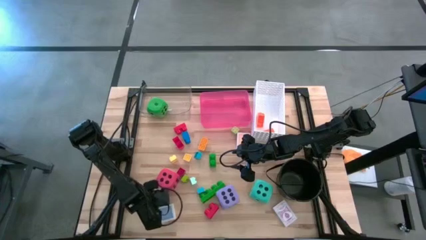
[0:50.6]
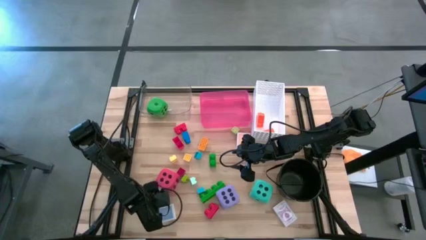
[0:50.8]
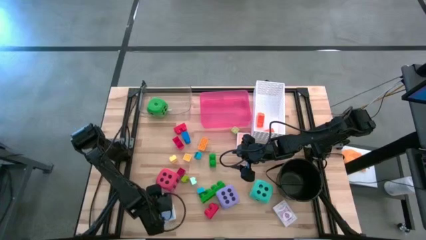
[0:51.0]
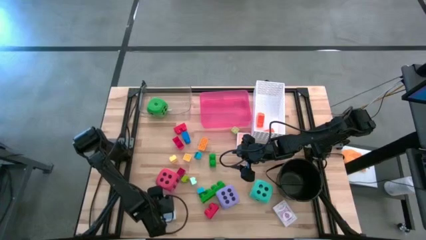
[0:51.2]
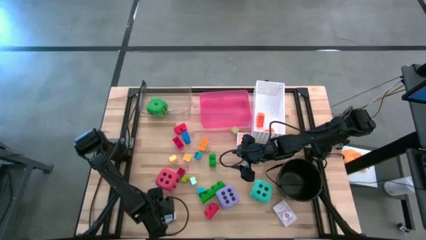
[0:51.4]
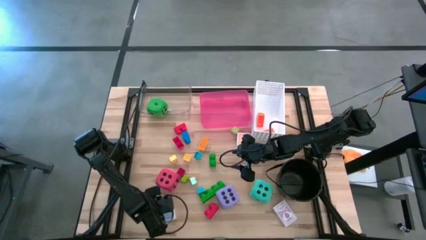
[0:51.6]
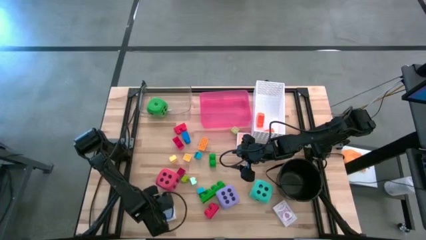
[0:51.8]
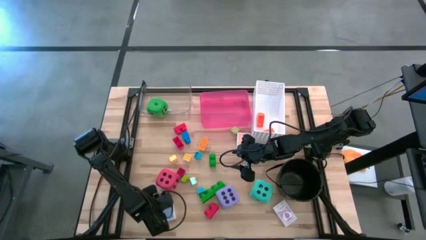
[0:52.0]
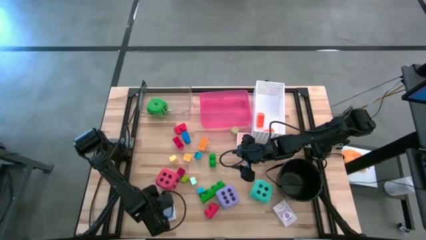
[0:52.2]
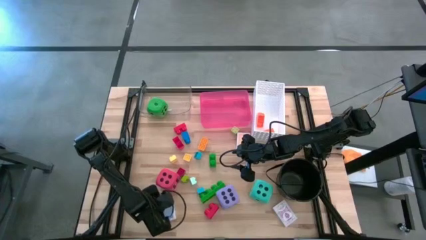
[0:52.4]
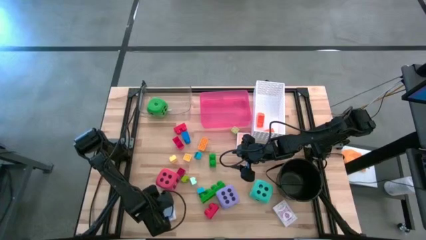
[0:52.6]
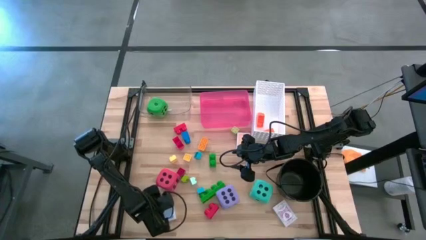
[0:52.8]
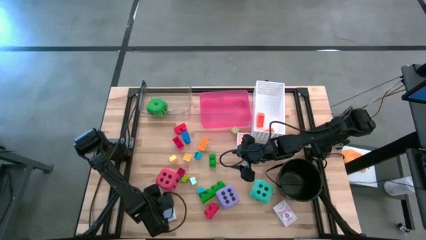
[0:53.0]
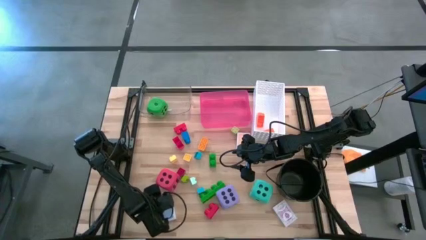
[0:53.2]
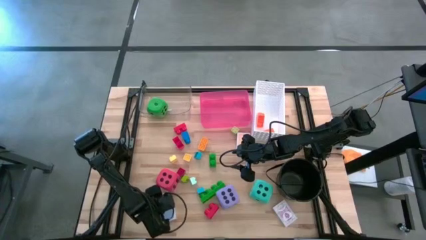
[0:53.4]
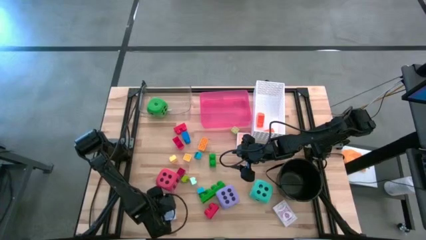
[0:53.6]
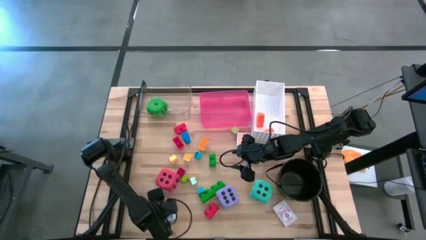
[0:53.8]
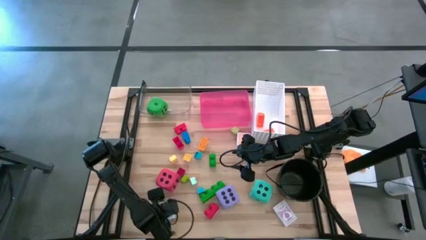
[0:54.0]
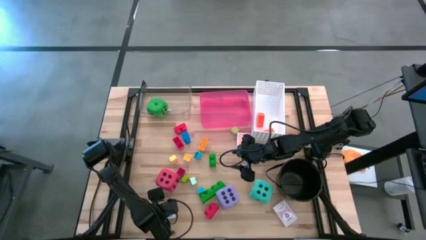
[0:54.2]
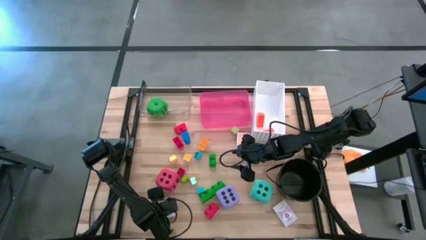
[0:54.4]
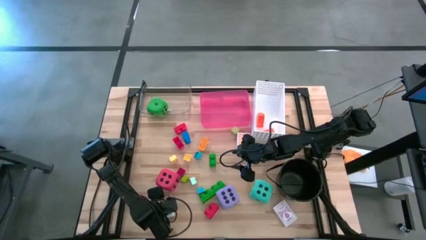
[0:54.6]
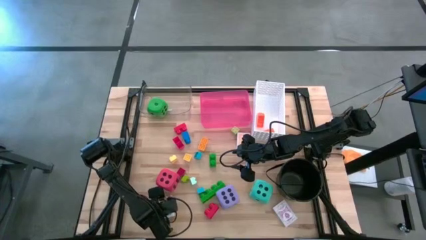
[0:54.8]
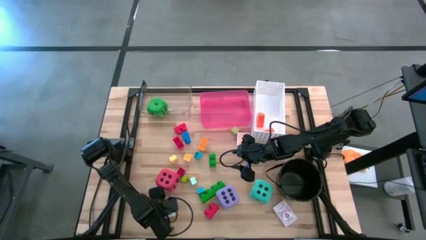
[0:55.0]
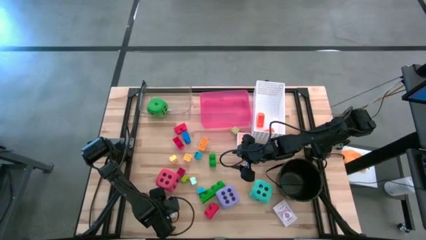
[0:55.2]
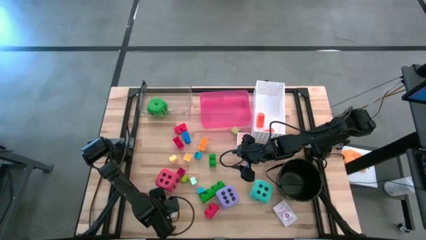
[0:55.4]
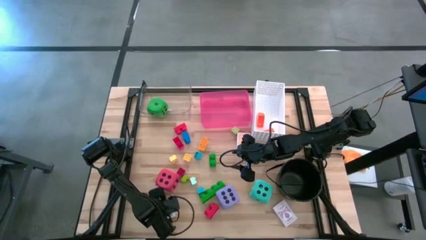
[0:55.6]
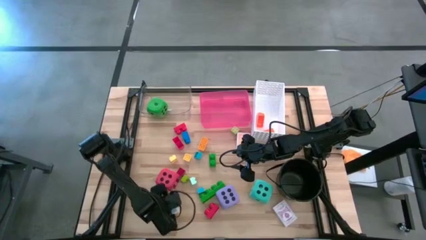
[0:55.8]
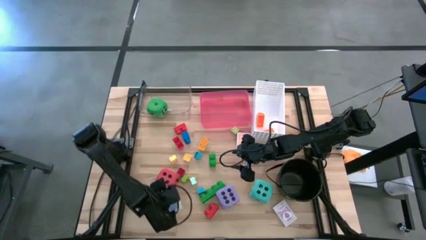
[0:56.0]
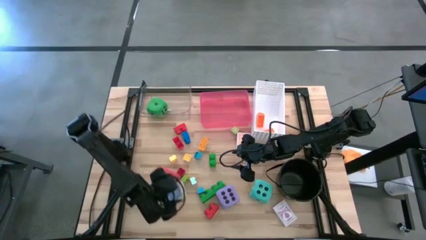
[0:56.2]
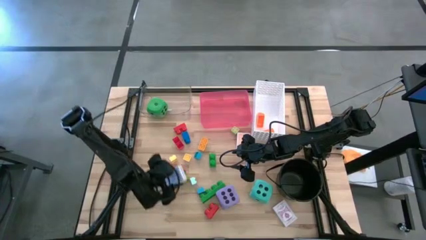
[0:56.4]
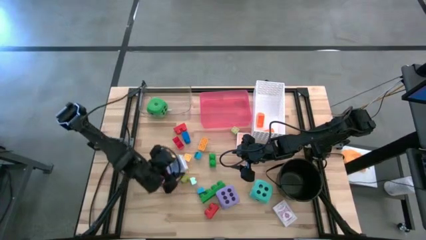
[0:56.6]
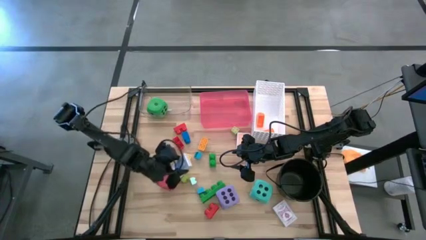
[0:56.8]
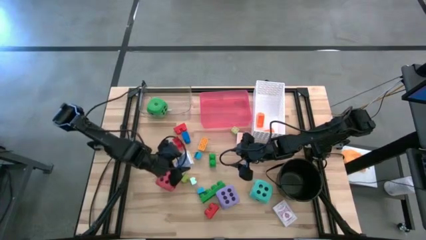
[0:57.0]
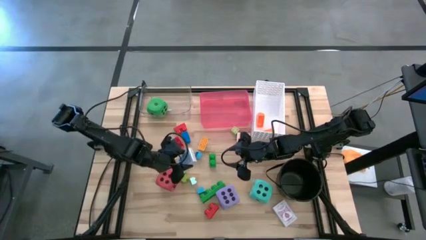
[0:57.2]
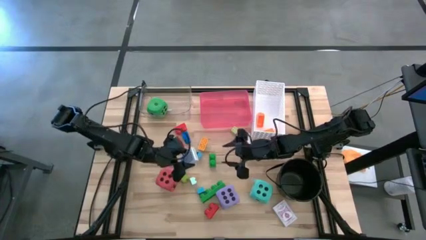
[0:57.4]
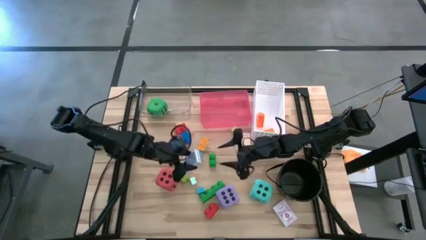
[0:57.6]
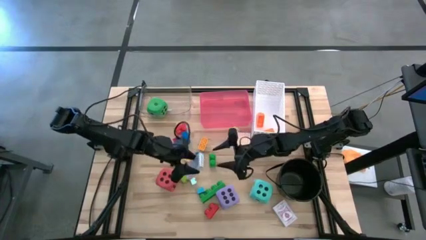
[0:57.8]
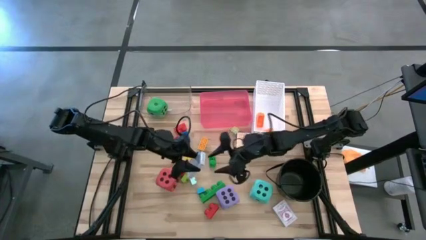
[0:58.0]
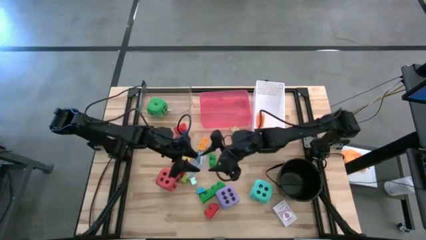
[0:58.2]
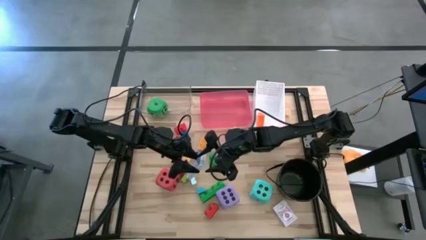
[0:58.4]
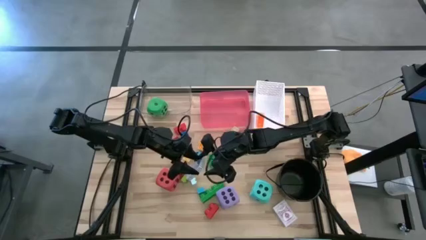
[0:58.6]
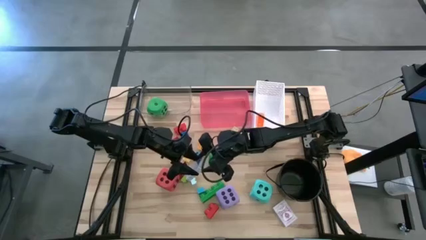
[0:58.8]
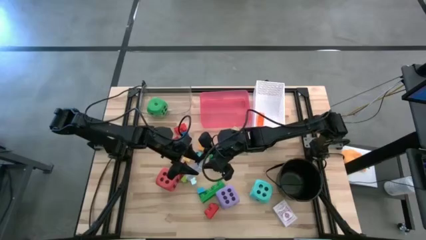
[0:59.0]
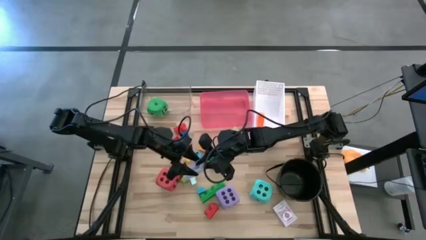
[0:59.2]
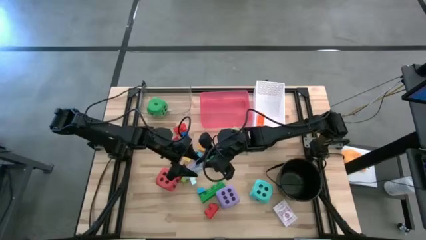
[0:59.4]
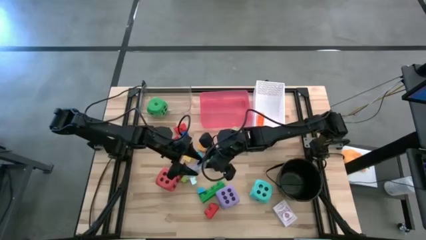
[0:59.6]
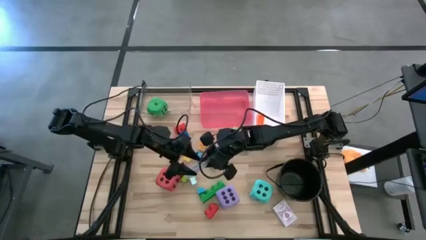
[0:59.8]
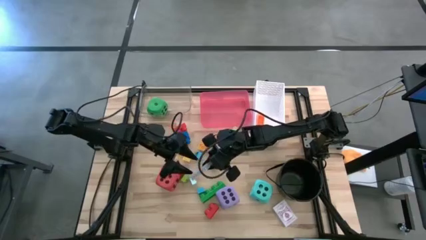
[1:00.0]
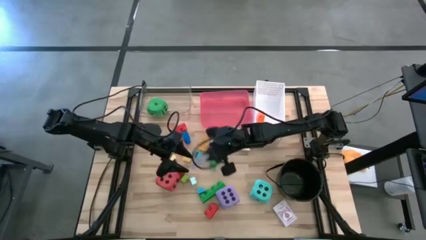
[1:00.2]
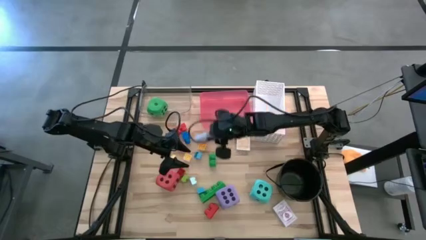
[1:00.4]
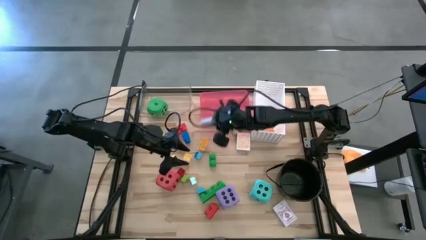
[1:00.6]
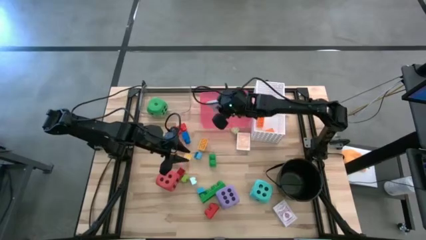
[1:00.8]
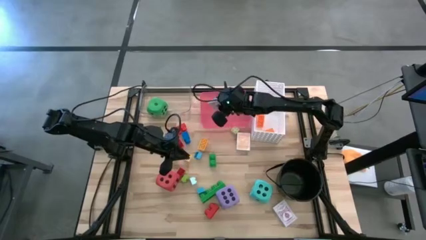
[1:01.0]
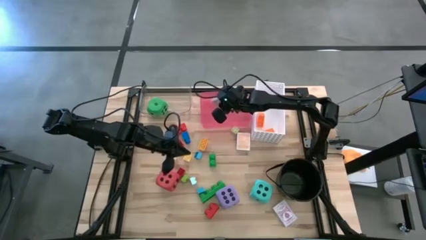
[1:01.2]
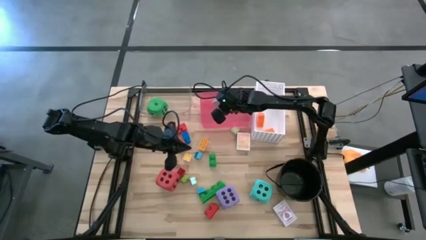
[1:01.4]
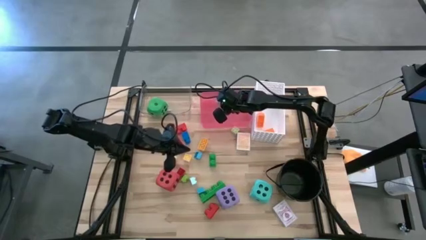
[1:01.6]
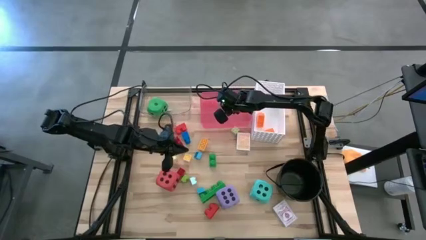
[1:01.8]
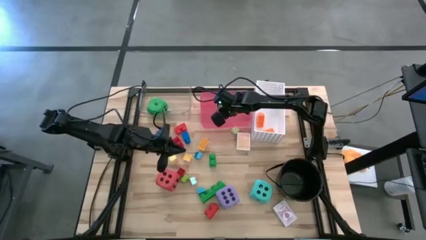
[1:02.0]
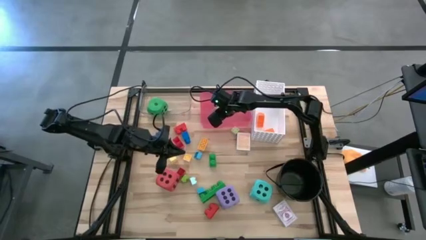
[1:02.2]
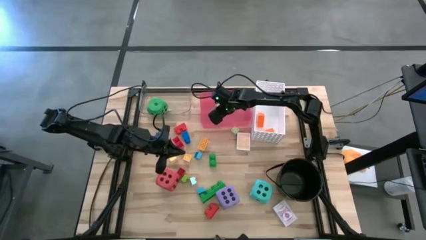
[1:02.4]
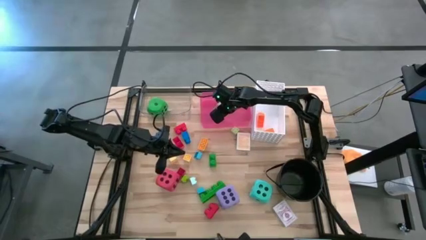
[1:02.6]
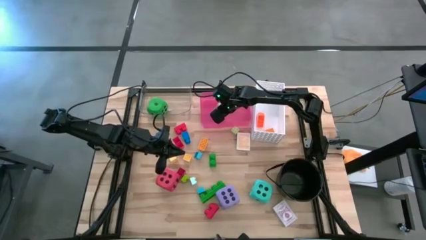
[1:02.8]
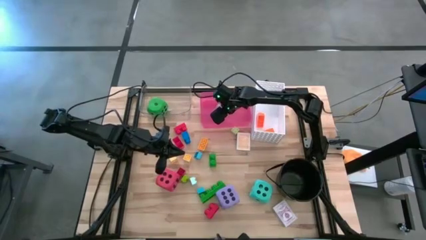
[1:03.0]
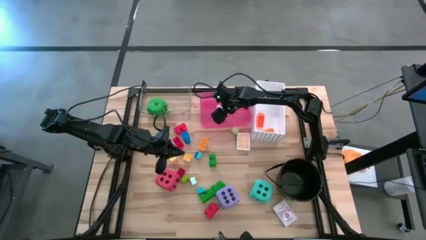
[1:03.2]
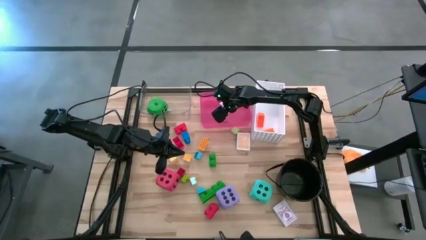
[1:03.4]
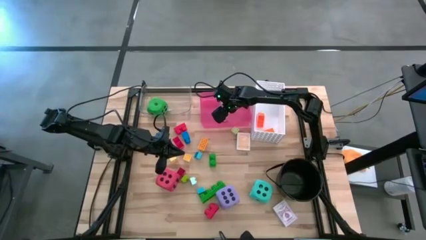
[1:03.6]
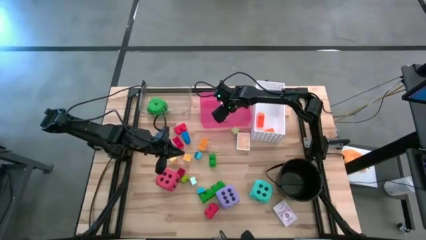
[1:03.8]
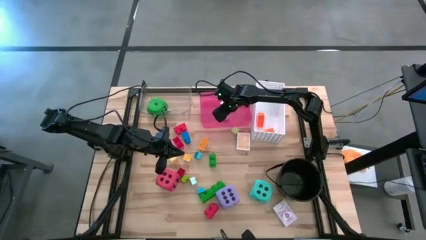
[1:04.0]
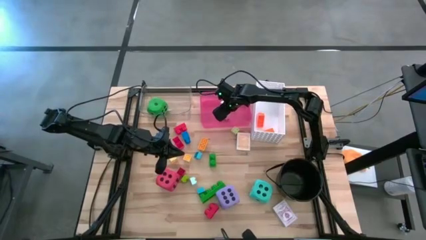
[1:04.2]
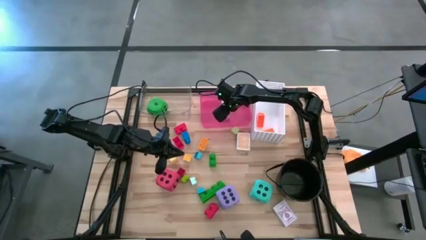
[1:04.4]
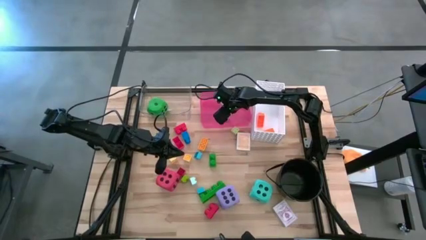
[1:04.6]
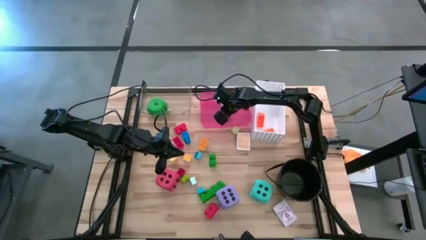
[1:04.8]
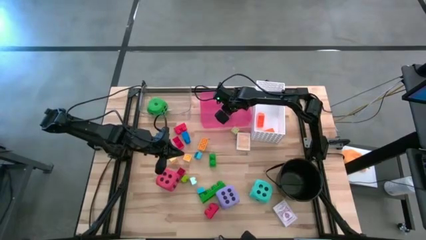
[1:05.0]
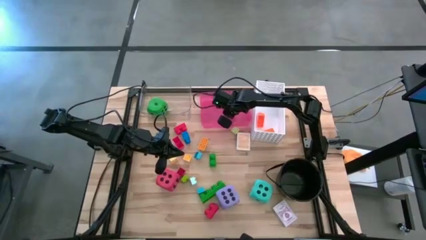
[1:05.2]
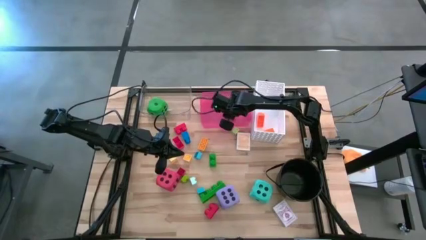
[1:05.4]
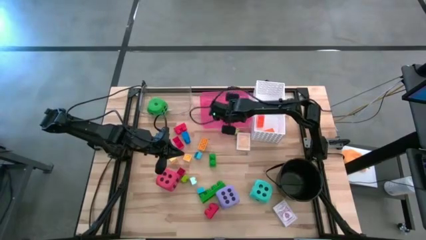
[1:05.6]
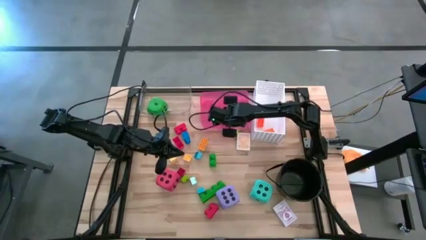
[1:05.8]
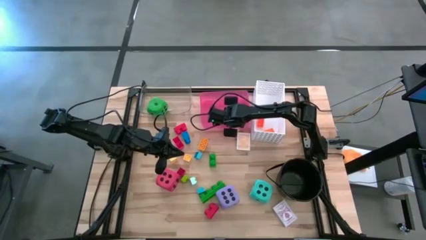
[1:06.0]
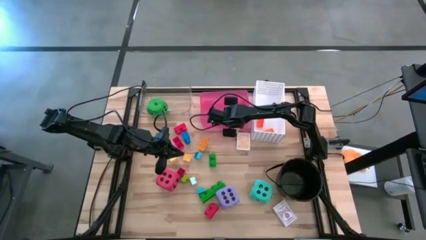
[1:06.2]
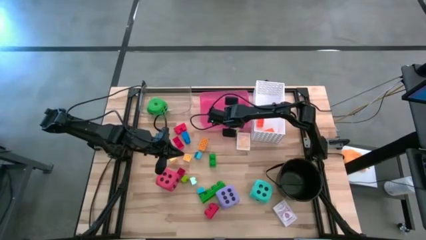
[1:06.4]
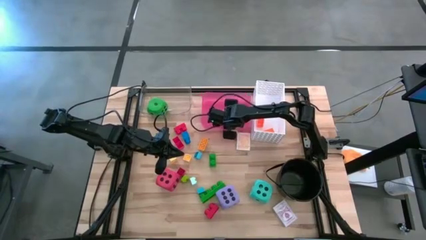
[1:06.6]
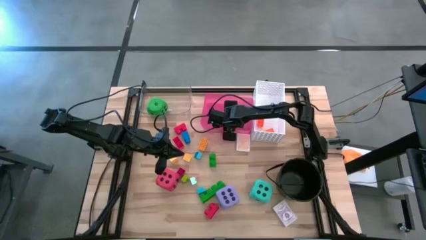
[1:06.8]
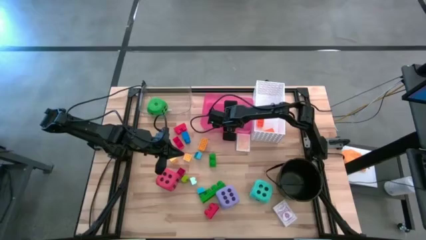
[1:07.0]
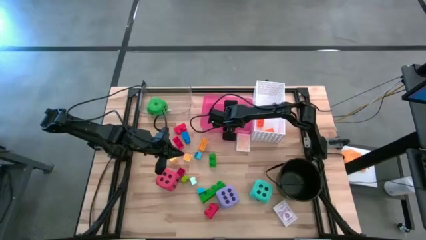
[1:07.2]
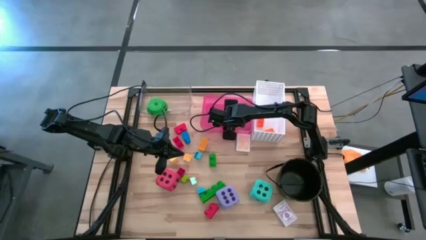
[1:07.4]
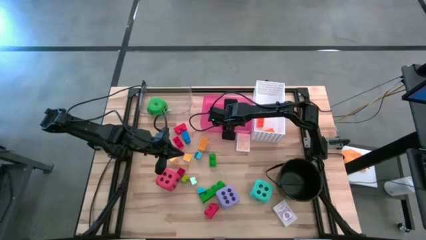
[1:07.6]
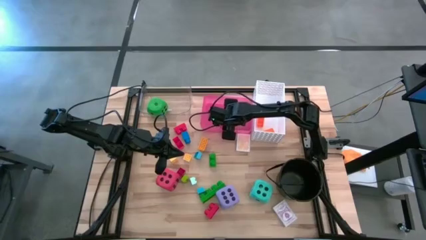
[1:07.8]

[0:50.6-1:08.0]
Task: Pick & Place Toys
Put the blue deck of cards into the pink bin
